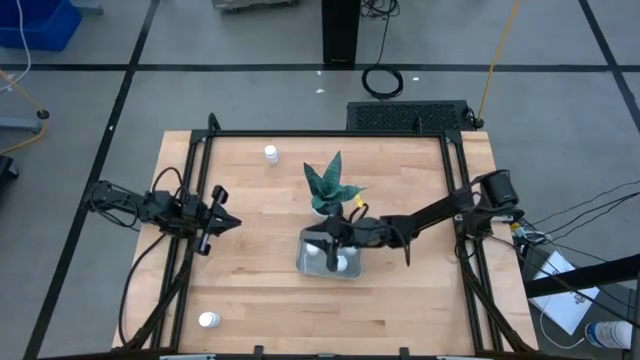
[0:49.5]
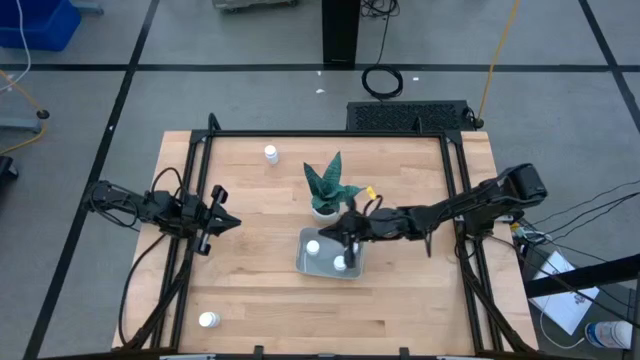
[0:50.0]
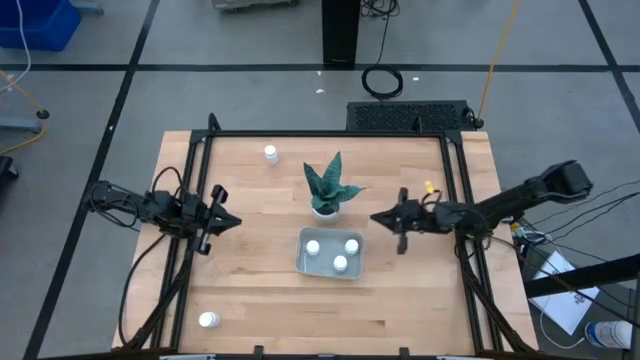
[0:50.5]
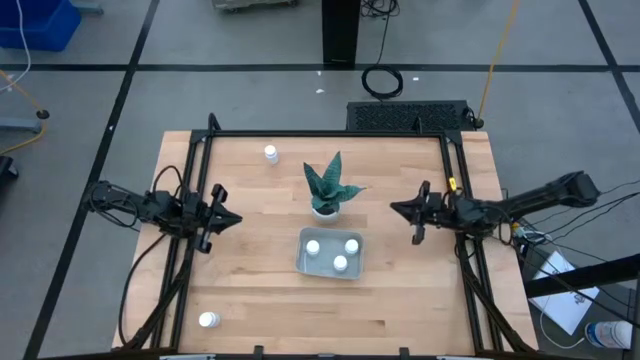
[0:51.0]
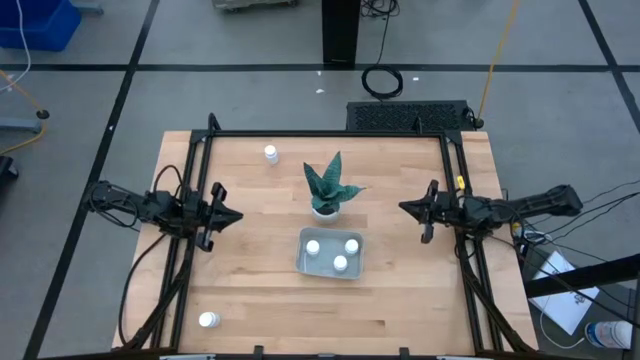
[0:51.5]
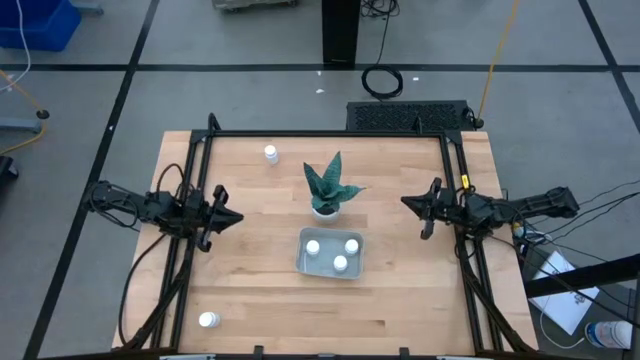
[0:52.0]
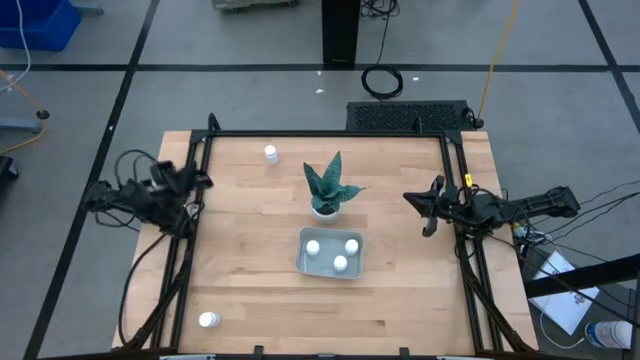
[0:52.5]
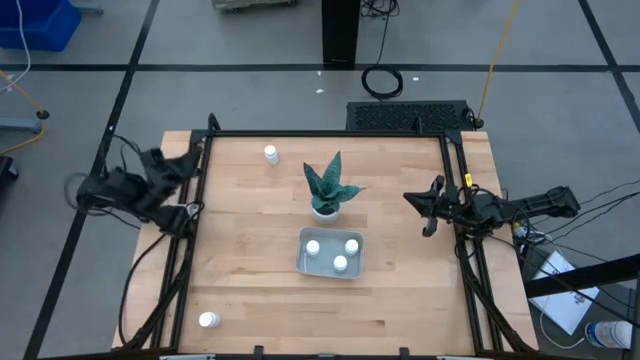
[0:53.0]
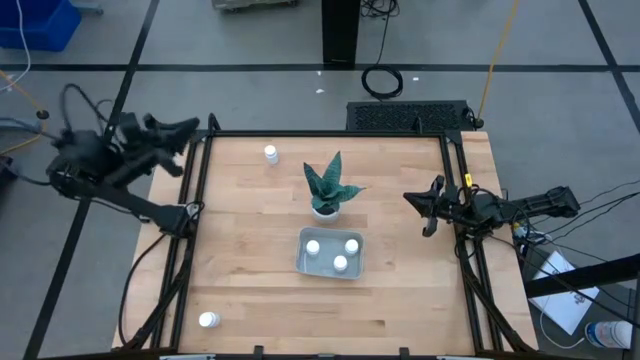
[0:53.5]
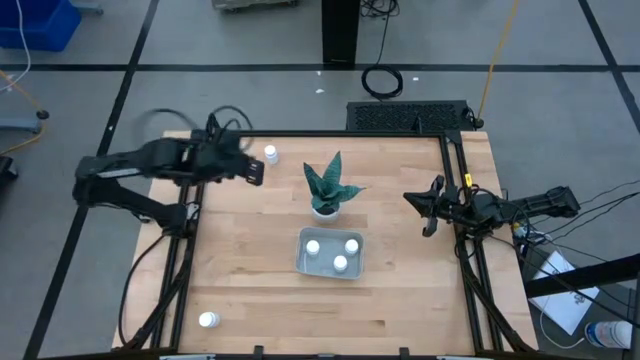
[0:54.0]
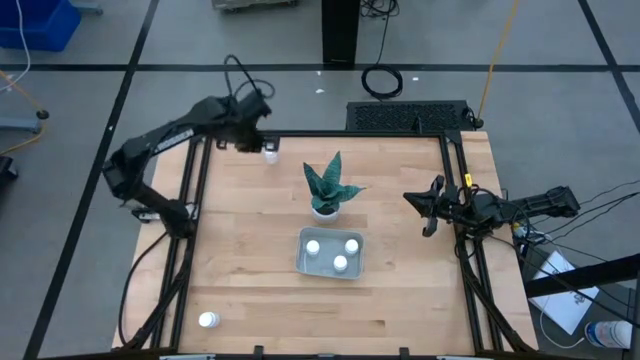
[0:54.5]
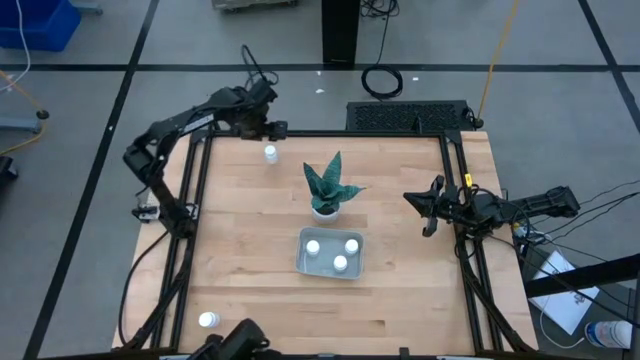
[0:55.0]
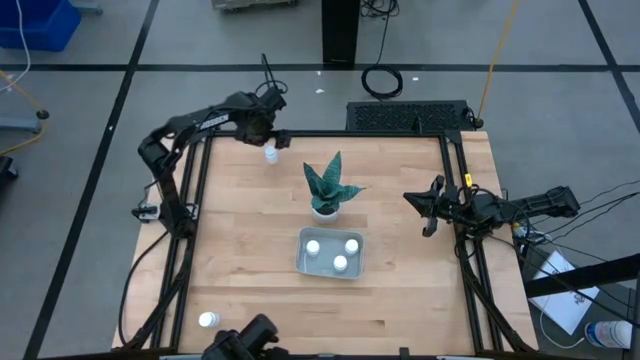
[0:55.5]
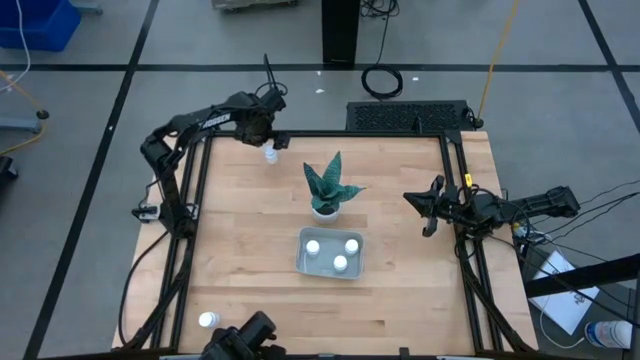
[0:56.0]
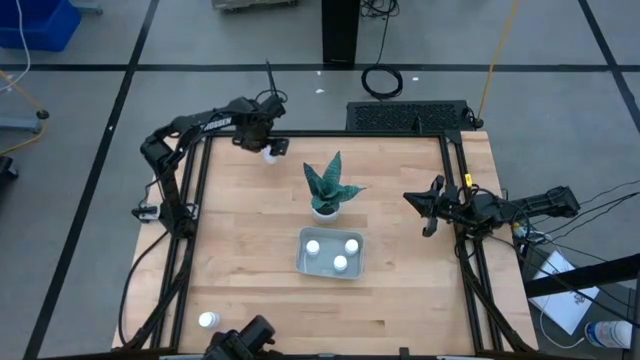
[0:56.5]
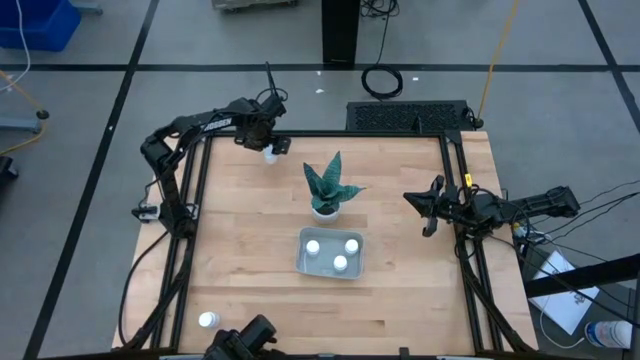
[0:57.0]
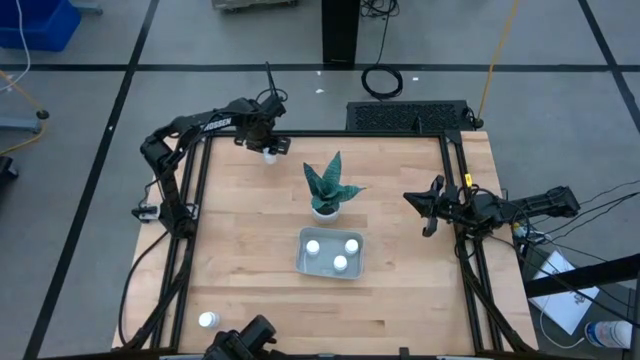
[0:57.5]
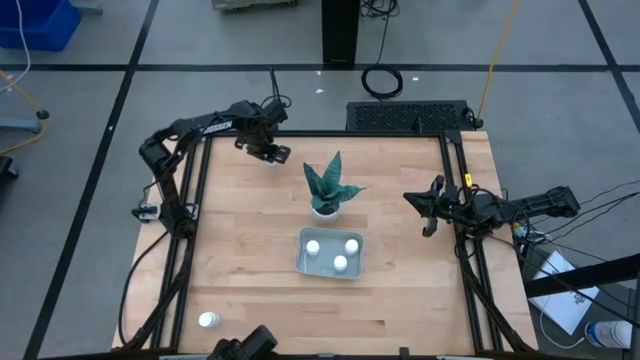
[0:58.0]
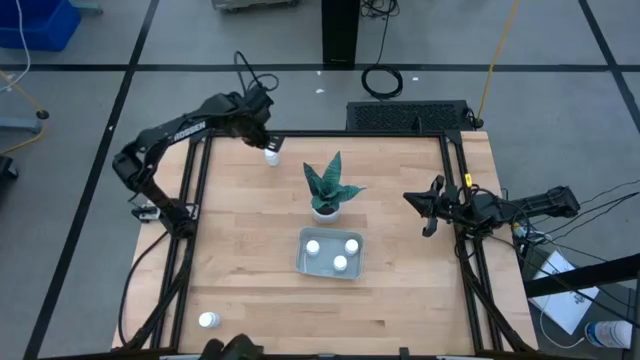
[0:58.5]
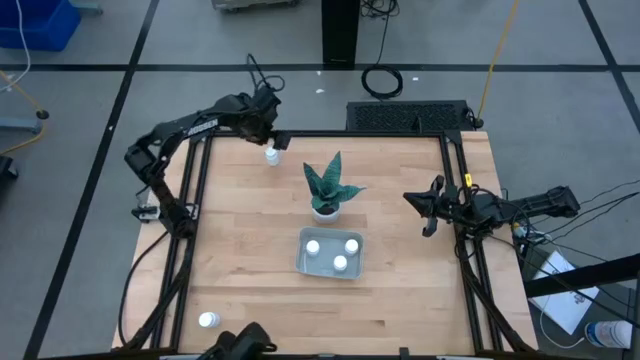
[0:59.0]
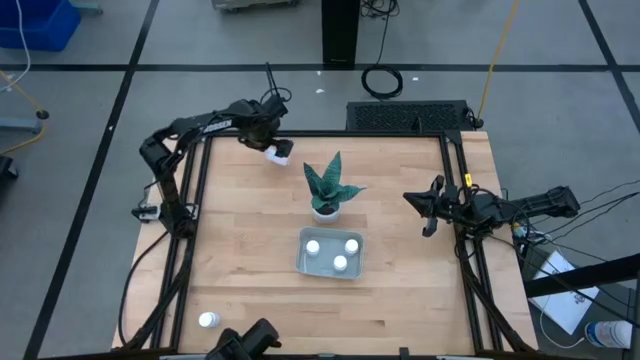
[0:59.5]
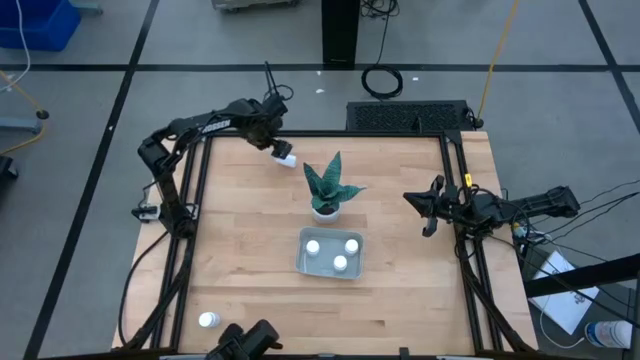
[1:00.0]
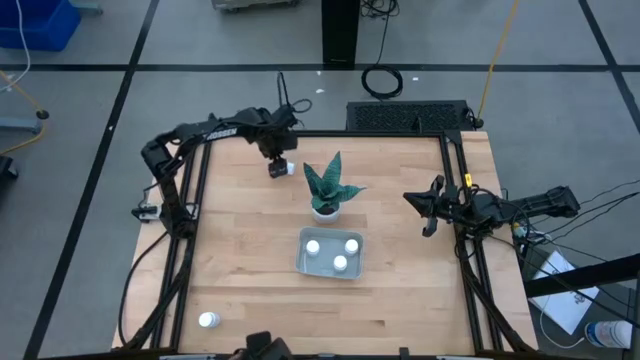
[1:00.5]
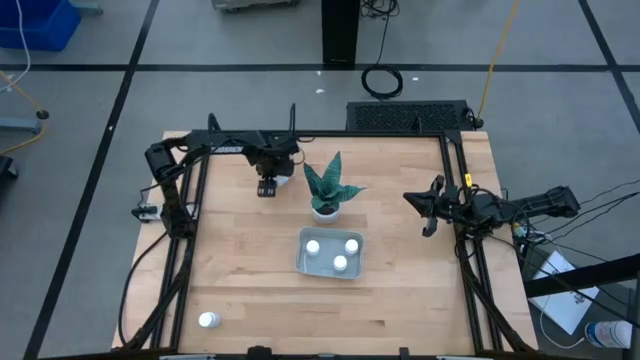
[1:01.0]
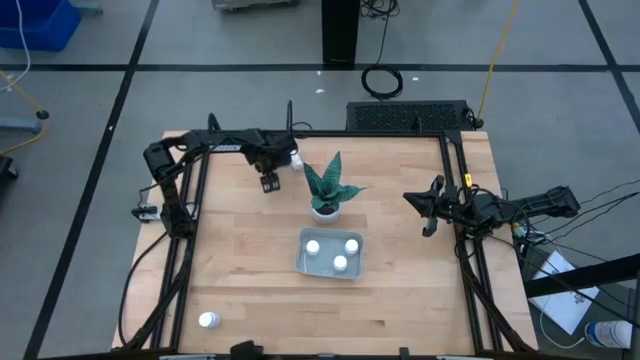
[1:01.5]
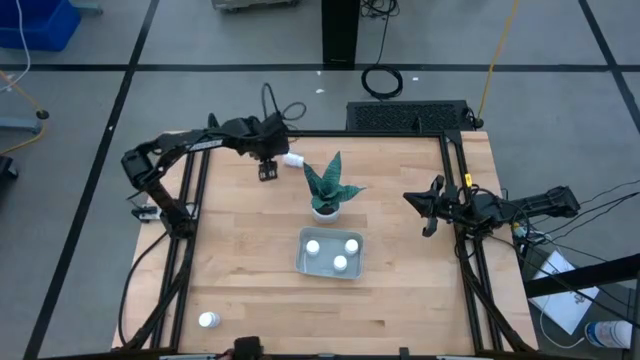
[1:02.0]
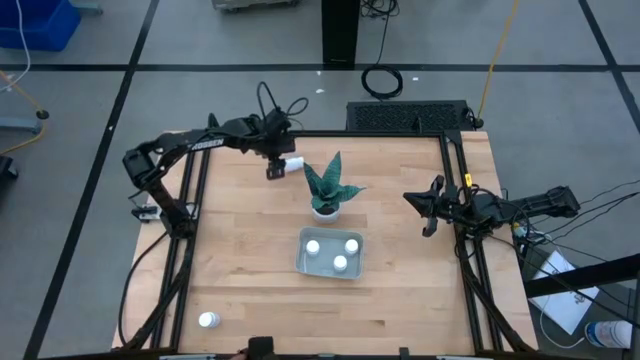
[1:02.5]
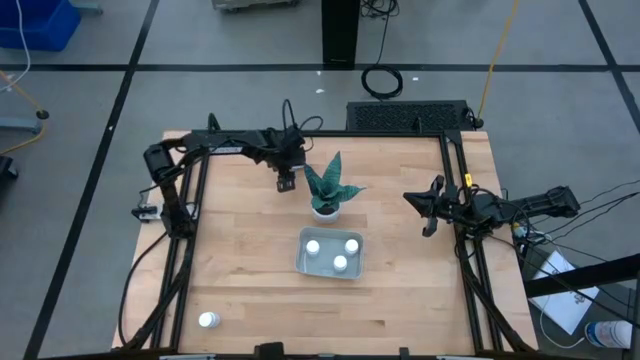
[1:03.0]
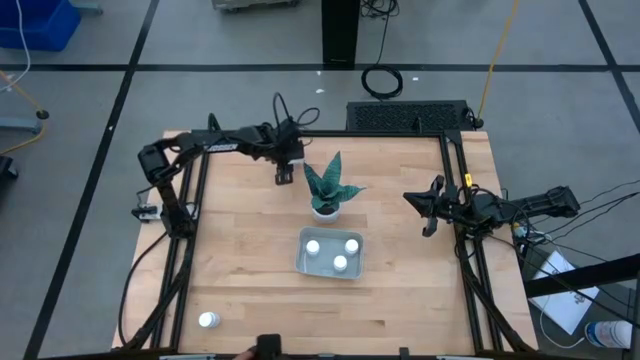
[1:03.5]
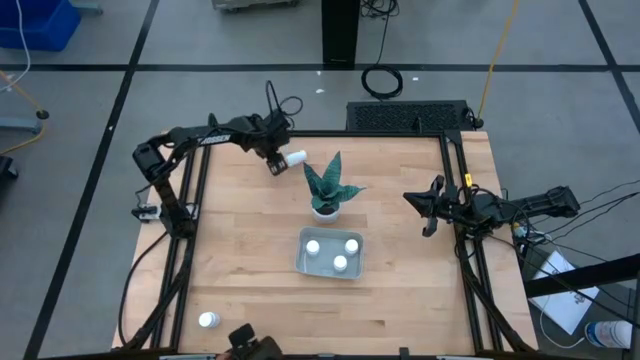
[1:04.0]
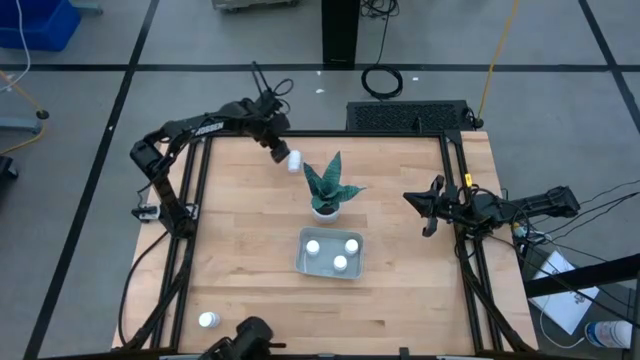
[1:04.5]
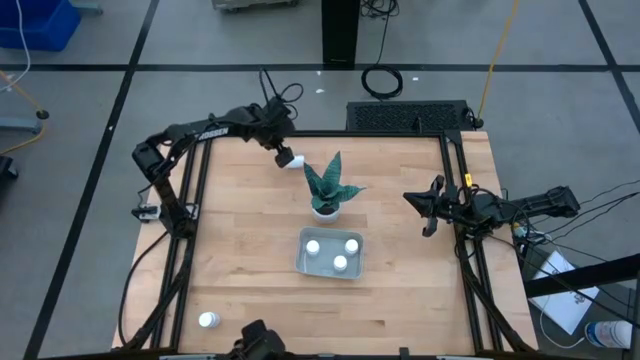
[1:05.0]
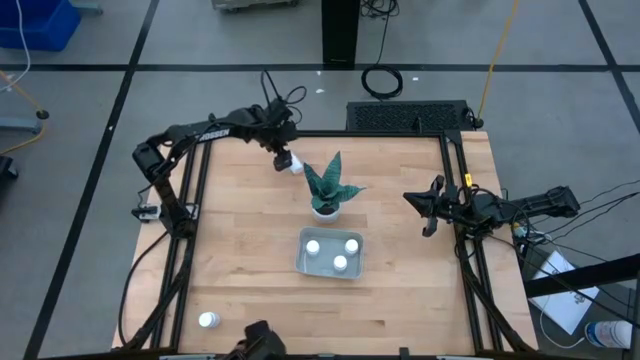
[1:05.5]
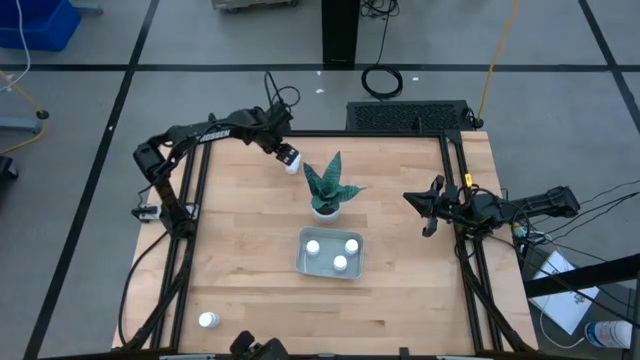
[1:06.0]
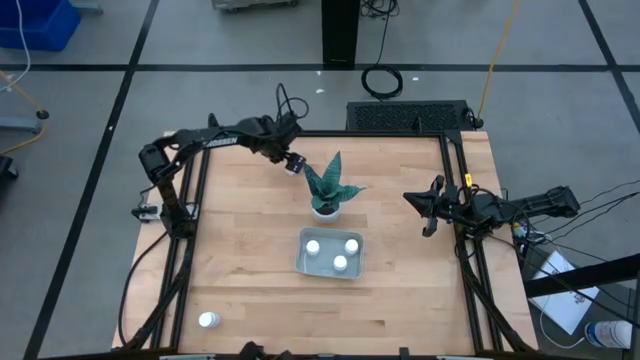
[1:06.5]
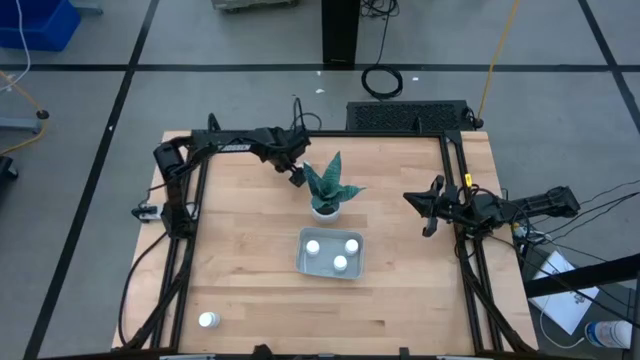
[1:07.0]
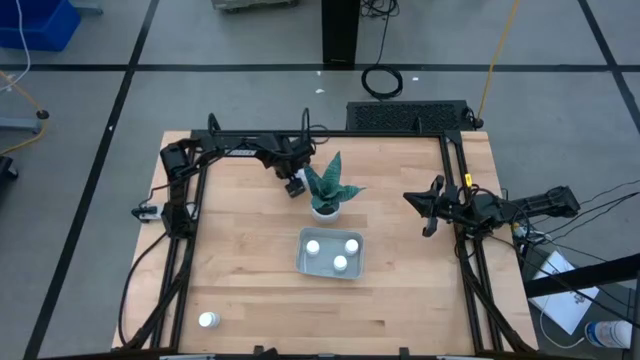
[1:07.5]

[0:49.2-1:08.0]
Task: Pick and place pill bottles into a basket
Put the white pill bottle into the gray bin

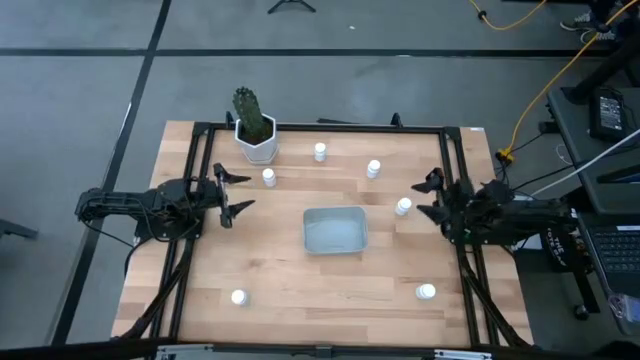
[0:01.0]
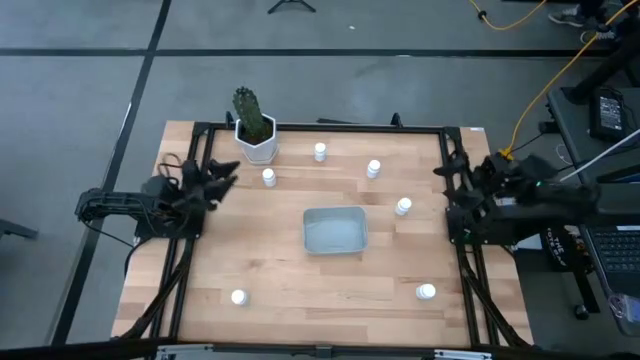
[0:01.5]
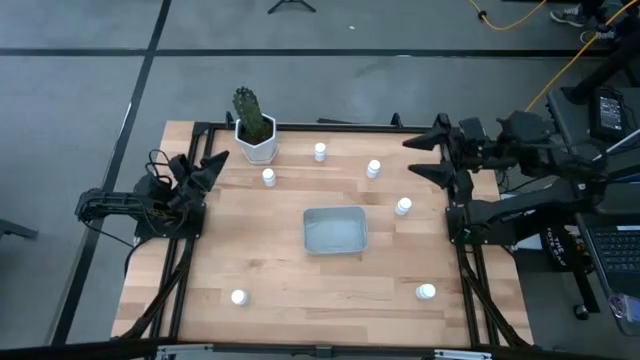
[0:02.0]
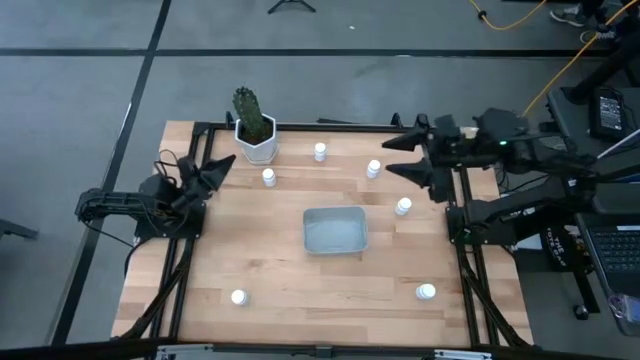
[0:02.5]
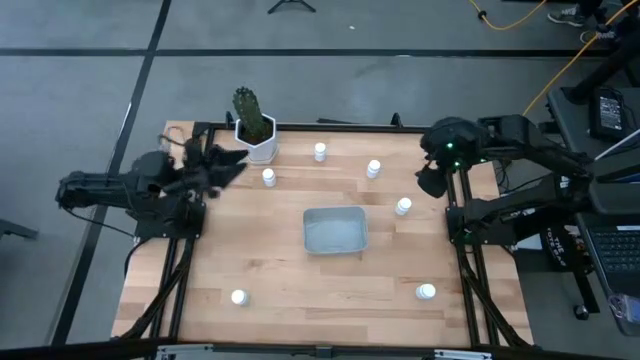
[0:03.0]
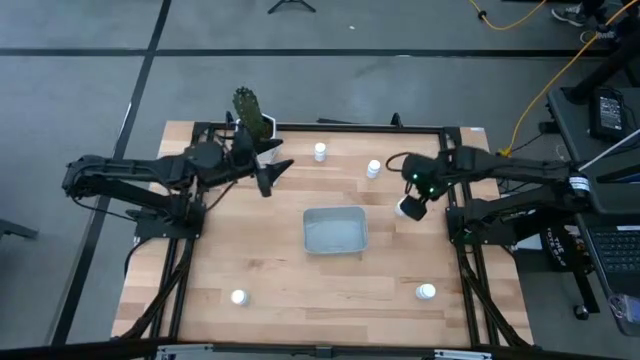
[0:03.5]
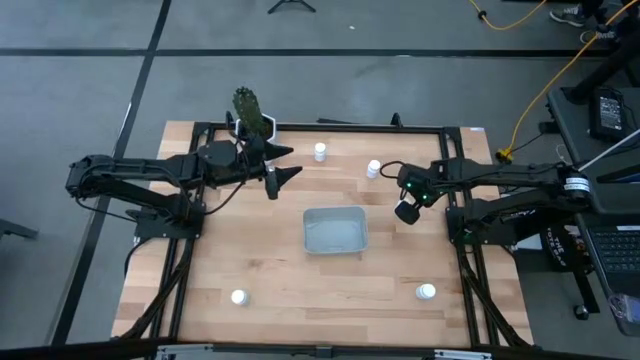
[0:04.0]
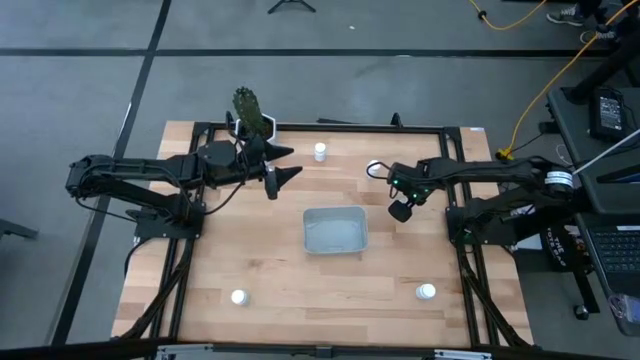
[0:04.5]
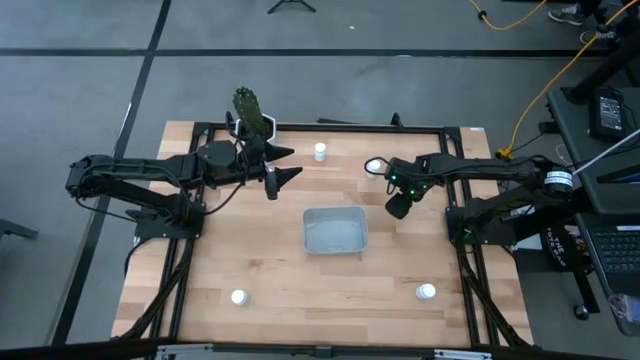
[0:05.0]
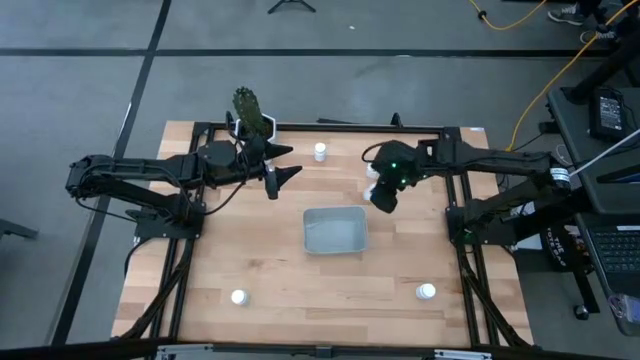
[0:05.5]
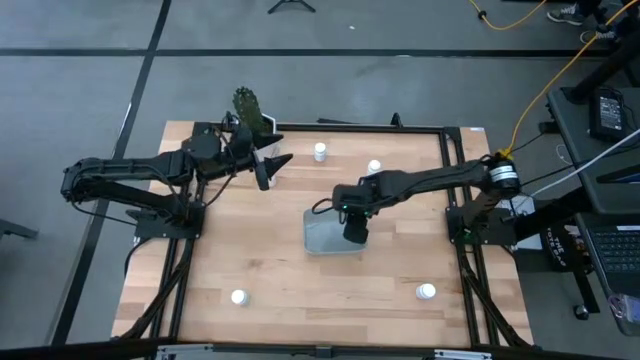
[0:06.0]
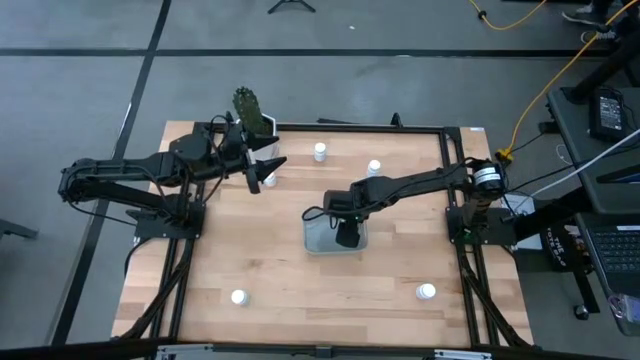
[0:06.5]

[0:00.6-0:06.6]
Task: Pick and place pill bottles into a basket
Put the white pill bottle into the gray bin
